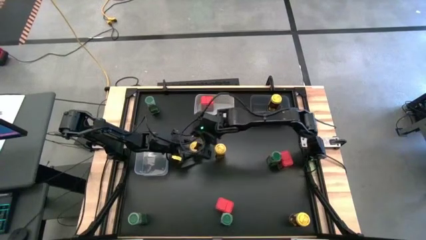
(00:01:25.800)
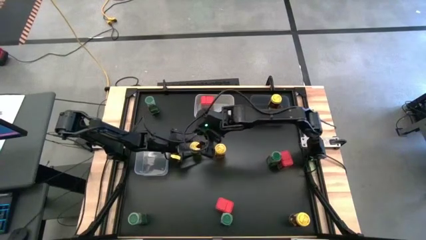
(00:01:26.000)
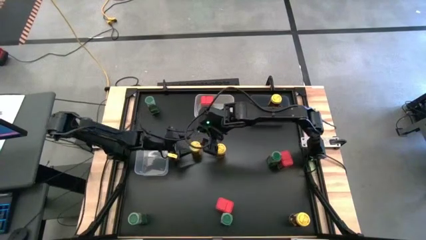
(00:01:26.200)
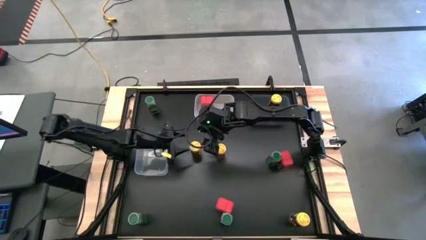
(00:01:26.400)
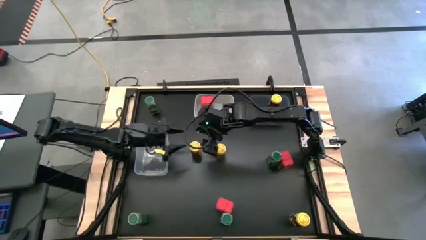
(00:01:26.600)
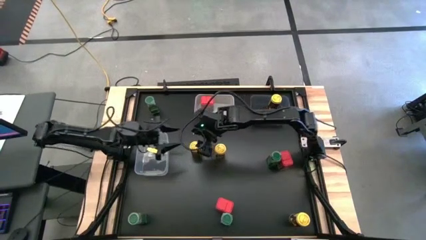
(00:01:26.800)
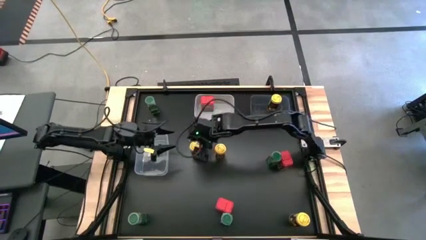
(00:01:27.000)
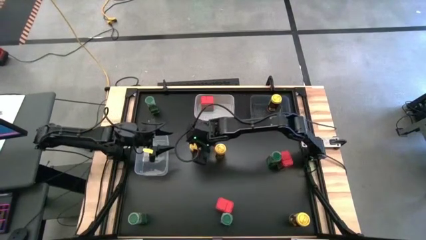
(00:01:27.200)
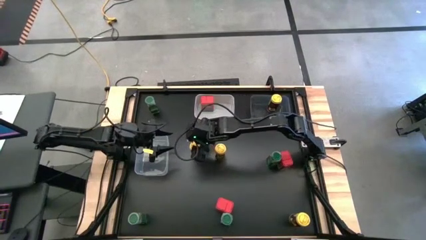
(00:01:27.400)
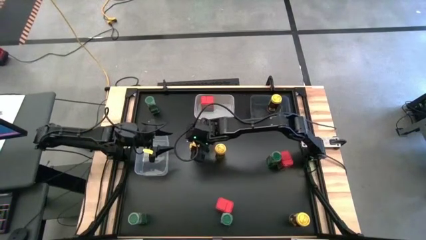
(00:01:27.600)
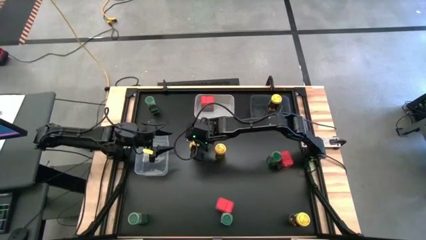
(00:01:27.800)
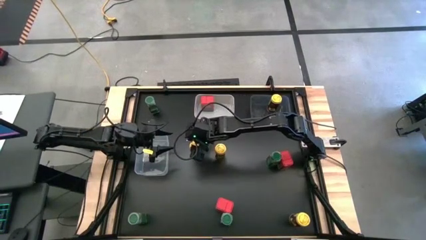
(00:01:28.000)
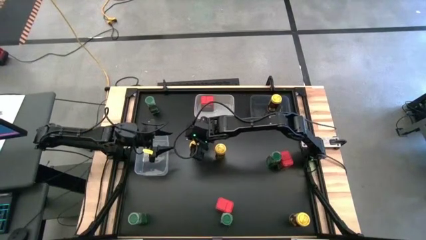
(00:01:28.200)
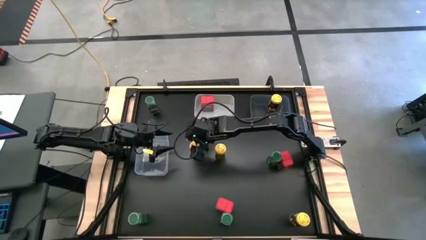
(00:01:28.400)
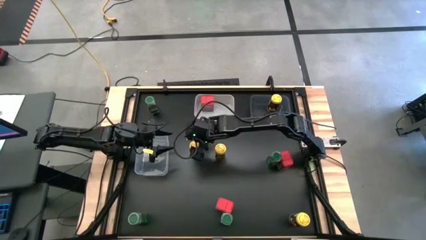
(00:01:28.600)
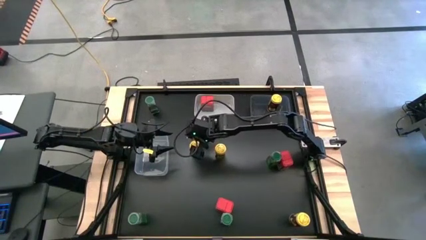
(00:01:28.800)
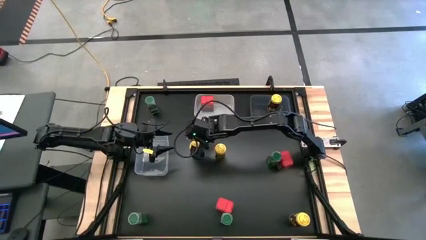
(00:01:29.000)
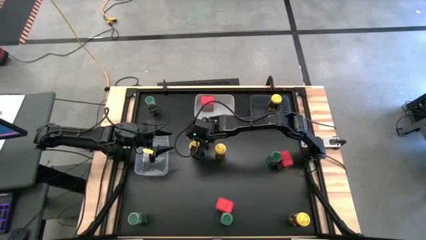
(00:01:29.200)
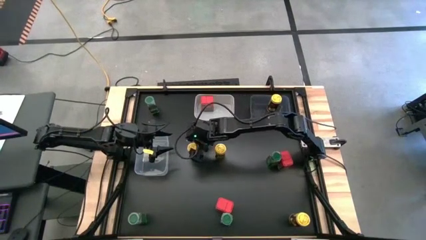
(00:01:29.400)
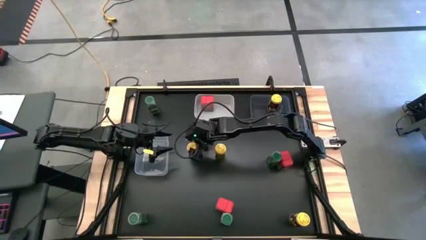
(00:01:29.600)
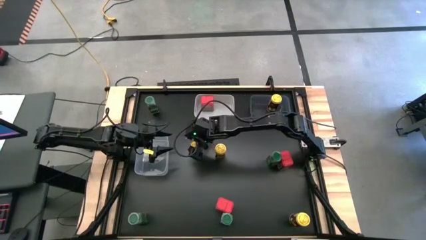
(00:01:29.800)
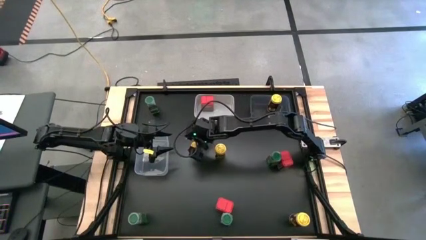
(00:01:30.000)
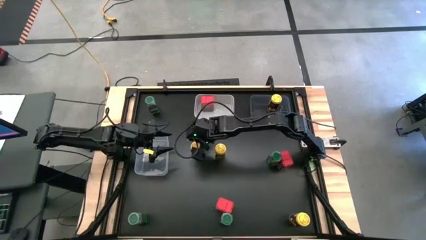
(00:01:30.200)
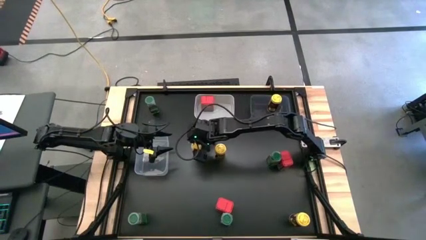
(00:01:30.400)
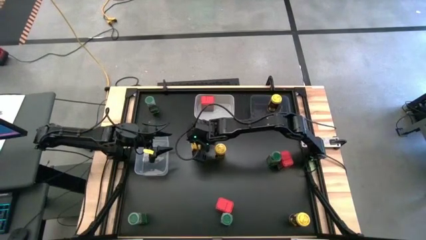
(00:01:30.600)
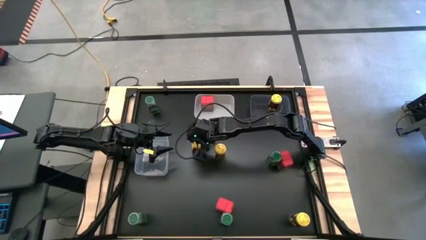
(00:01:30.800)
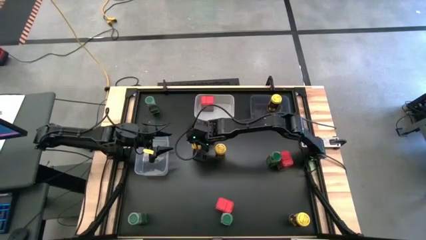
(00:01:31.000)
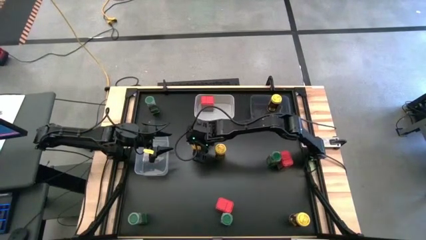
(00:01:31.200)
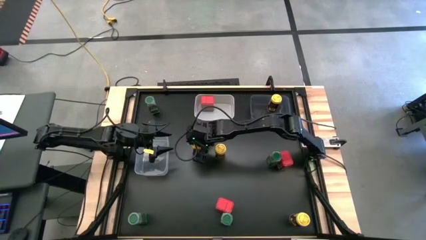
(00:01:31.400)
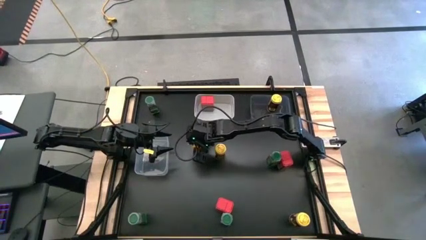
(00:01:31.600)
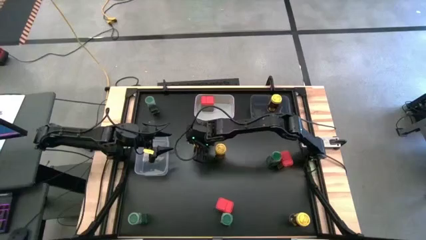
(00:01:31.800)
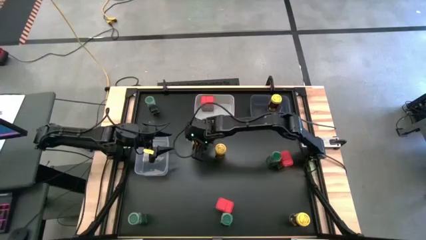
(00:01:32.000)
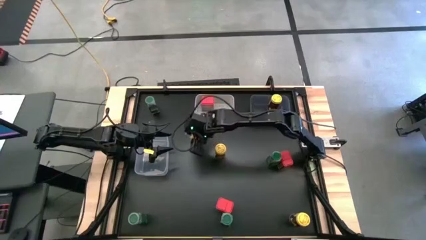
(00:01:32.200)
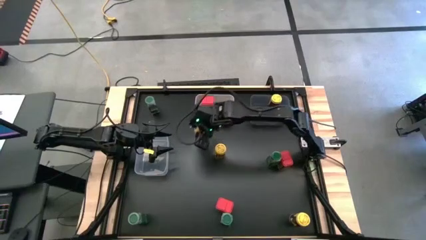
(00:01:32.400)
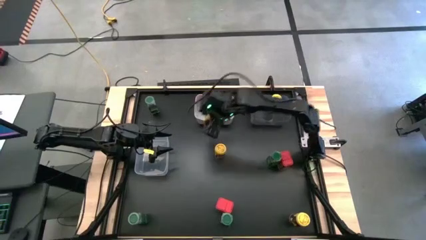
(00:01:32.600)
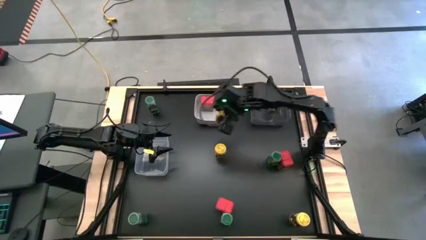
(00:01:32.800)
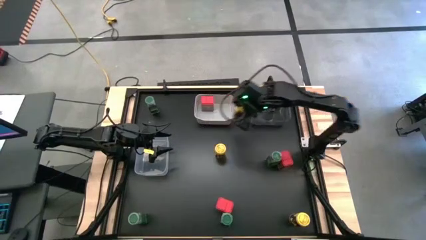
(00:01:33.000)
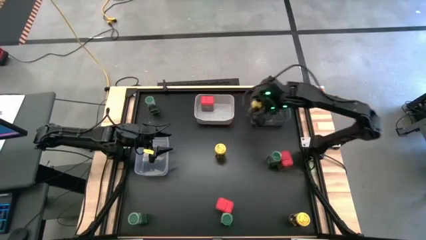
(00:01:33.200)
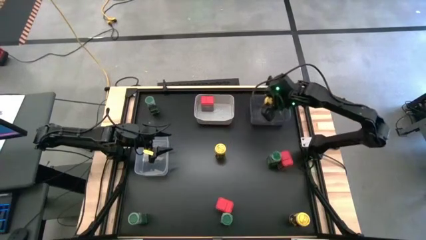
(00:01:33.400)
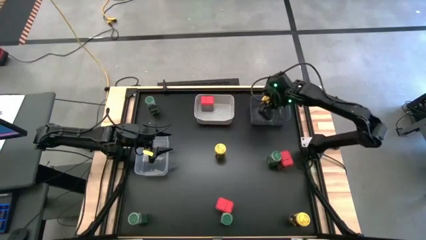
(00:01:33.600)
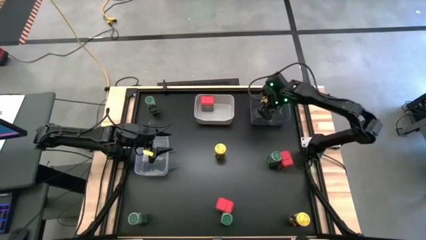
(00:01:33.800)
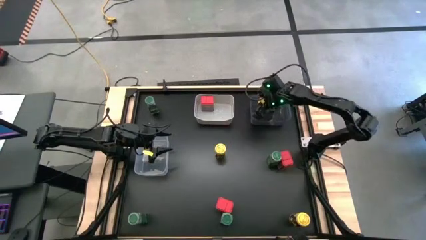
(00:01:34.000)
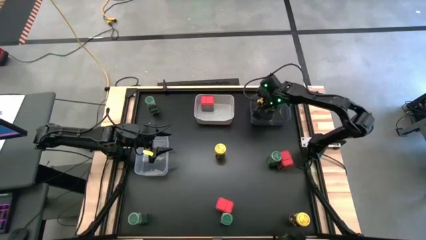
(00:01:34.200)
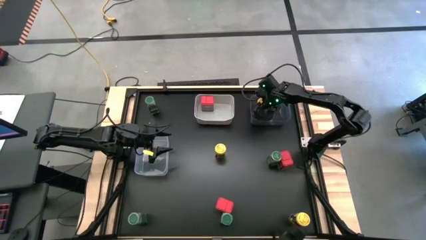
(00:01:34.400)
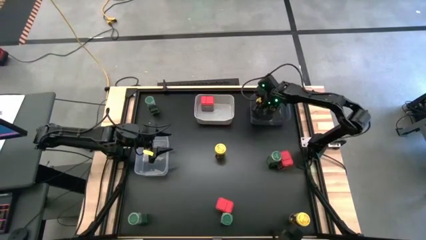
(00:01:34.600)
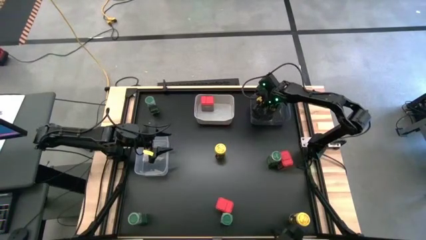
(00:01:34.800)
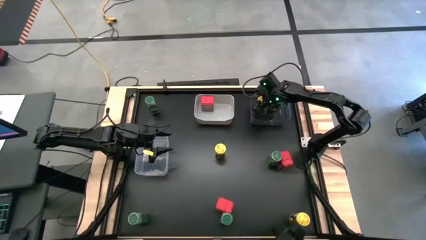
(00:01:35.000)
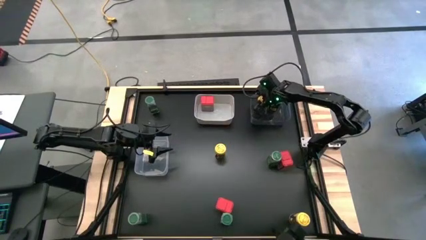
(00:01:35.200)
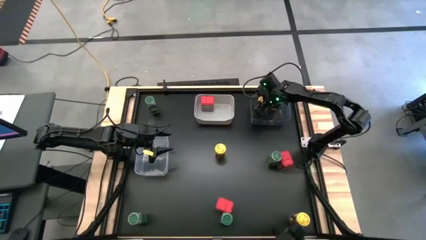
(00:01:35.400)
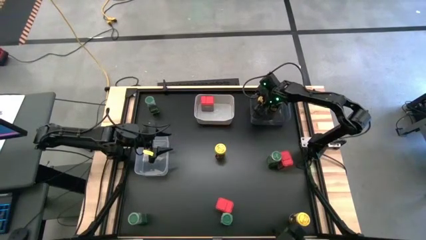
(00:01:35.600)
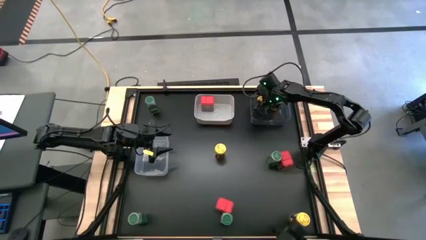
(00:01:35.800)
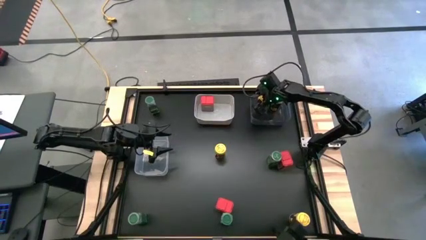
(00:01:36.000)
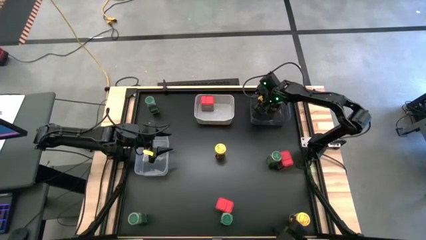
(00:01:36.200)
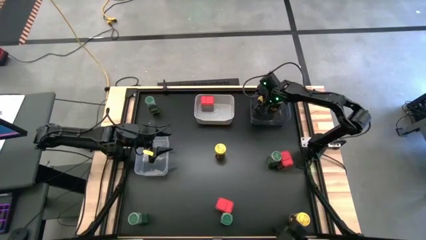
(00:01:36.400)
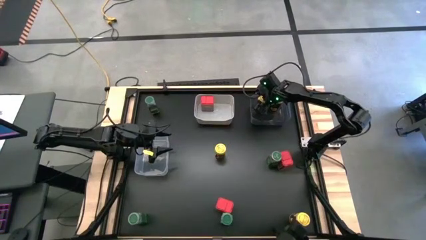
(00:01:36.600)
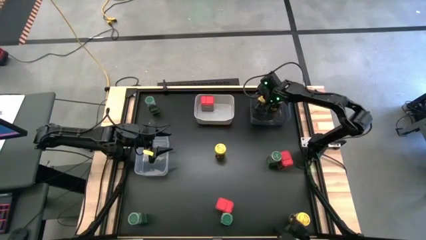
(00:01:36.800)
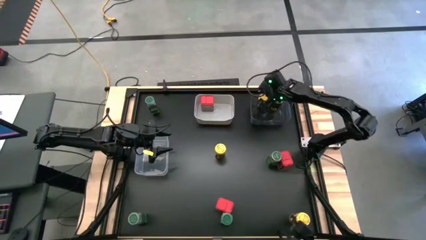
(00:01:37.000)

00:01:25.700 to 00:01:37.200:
Task: Sort spices by type
Put the bottom left yellow seasoning bottle into the black bin

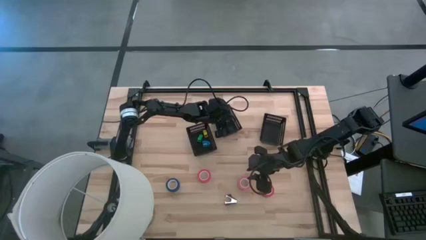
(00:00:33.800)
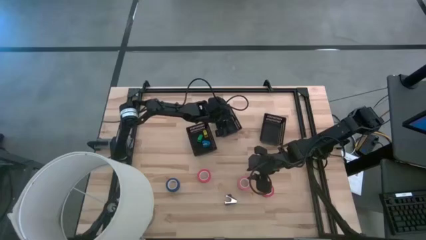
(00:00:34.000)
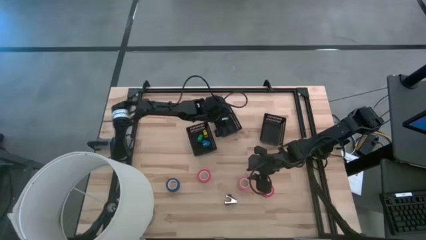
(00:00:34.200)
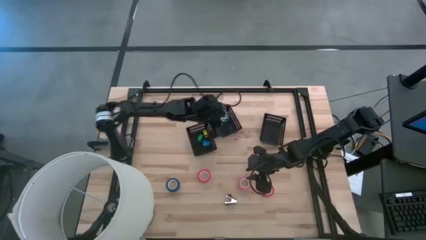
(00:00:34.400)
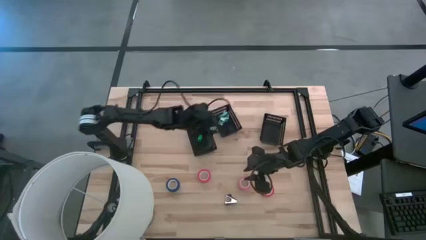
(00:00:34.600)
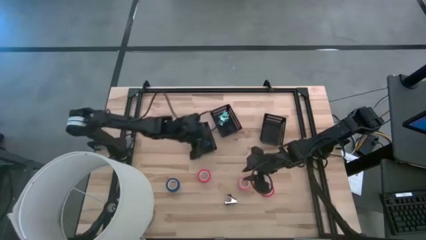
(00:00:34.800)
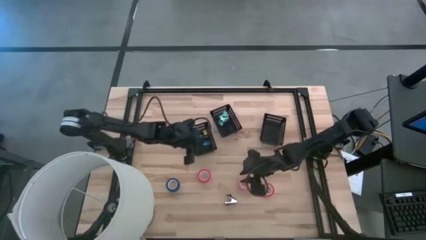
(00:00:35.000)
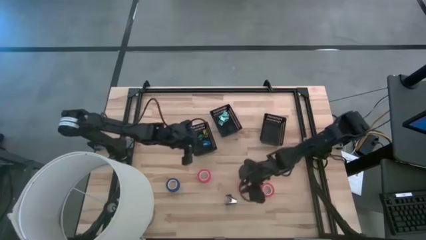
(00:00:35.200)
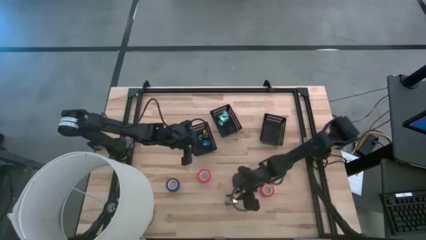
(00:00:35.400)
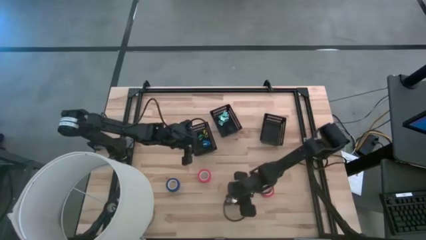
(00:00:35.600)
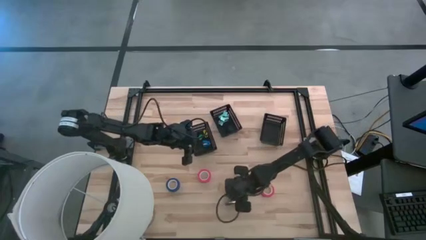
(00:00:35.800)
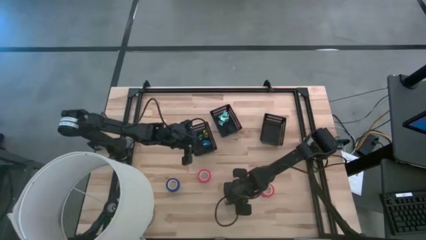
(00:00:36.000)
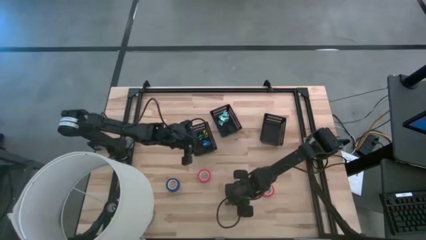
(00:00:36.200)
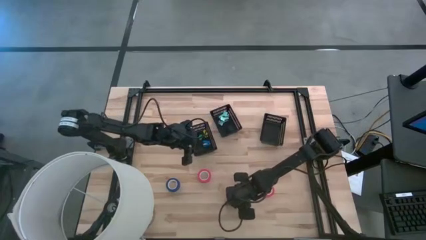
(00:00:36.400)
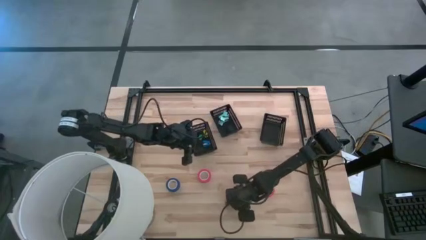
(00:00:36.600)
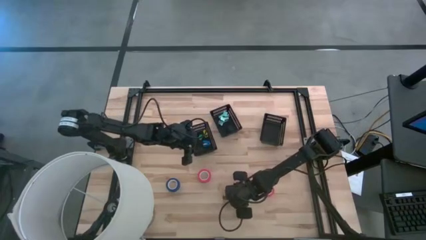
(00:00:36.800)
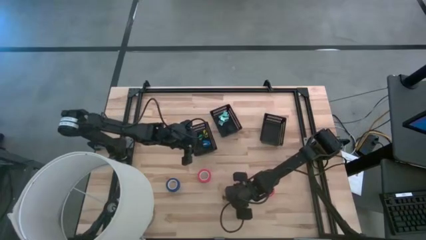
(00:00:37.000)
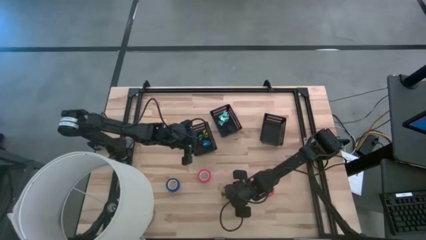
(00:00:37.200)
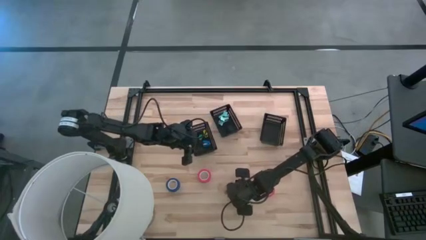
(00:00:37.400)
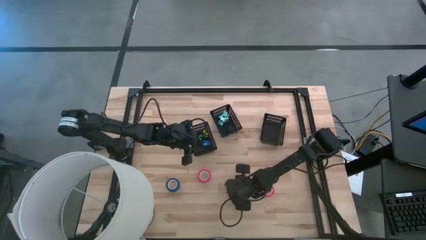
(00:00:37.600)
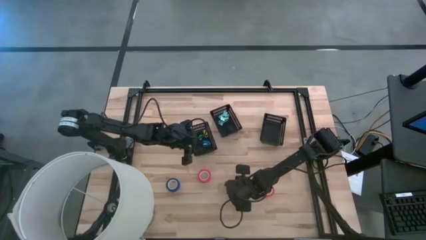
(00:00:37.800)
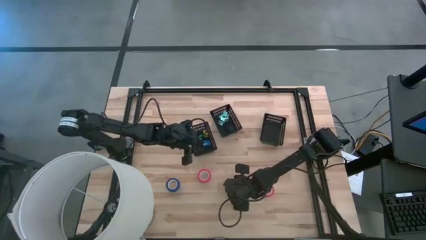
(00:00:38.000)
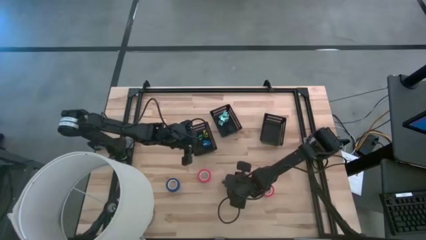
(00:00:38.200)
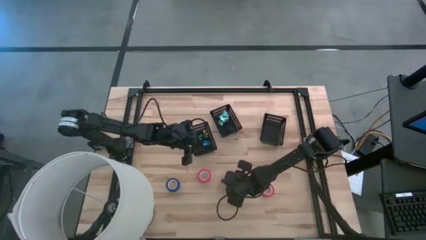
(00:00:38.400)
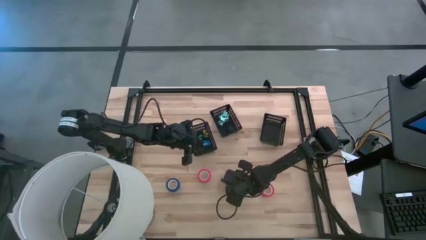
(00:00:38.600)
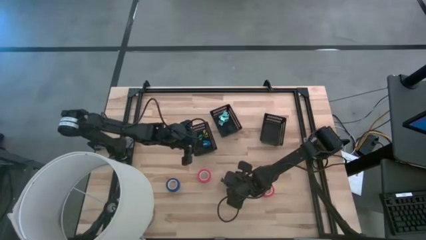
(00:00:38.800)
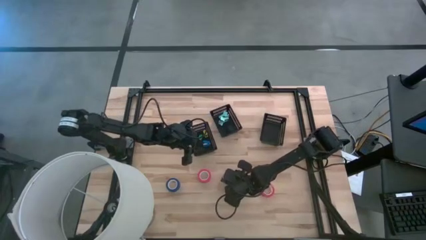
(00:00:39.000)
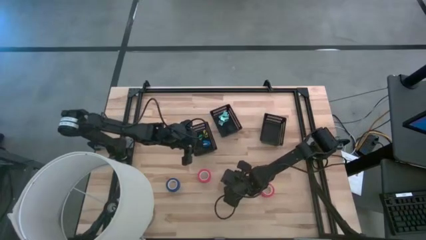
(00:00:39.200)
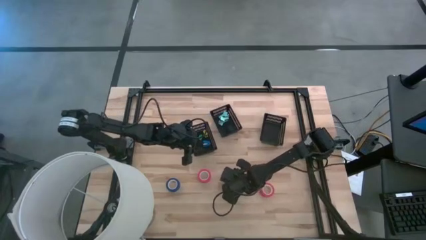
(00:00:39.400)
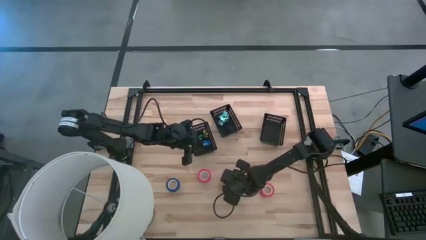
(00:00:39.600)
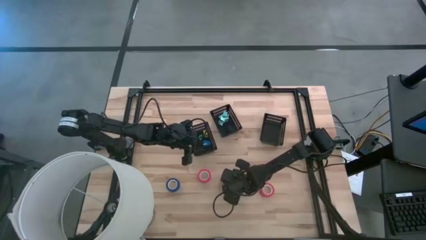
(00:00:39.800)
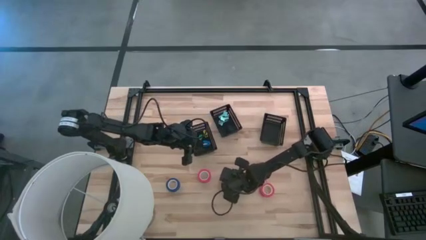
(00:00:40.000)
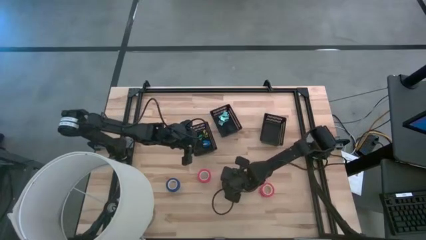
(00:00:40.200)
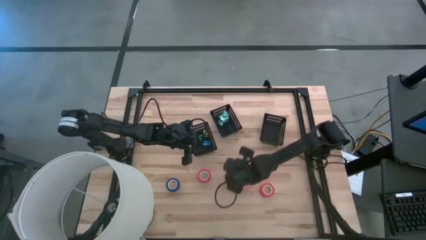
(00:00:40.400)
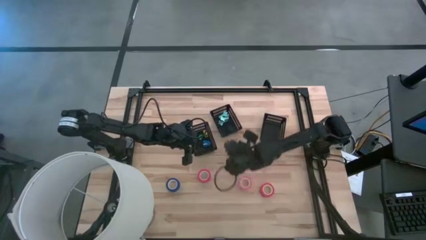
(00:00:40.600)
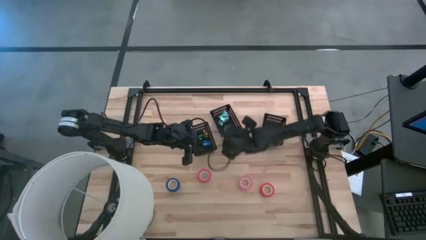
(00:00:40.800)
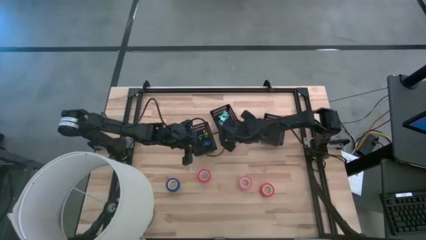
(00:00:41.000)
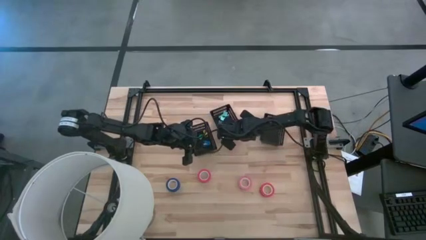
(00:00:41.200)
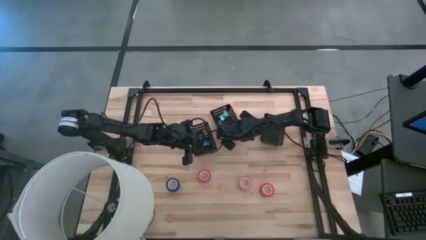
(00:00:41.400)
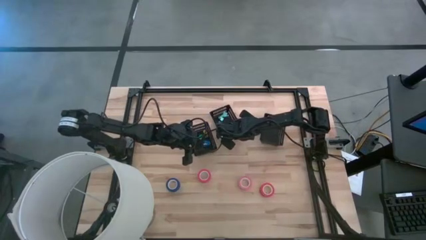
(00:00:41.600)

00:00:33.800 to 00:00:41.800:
Task: Pick and place Stapler, Stapler remover, tape
Put the black staple remover into the middle black basket
